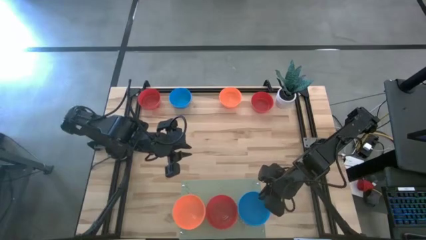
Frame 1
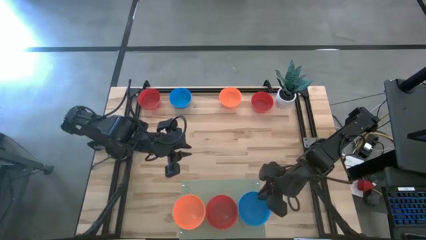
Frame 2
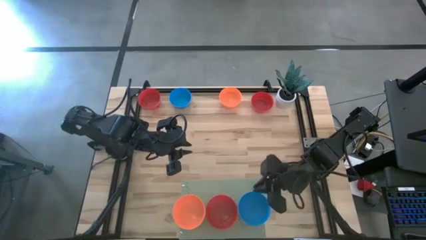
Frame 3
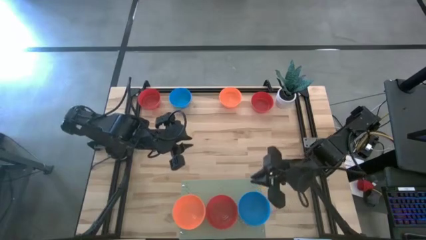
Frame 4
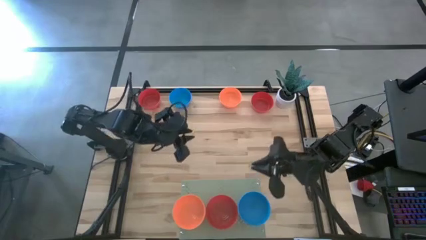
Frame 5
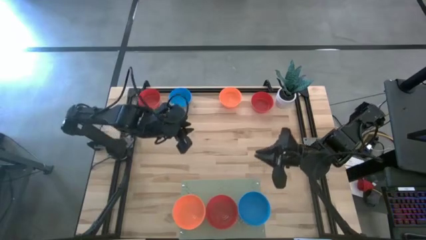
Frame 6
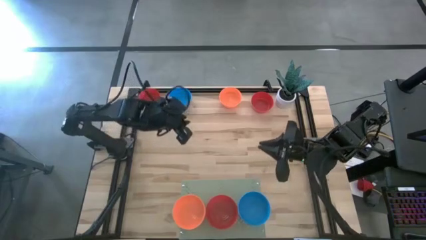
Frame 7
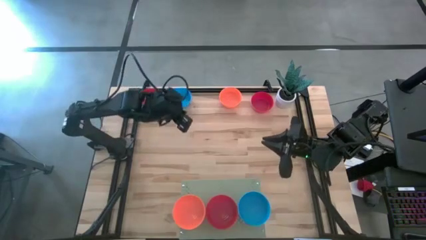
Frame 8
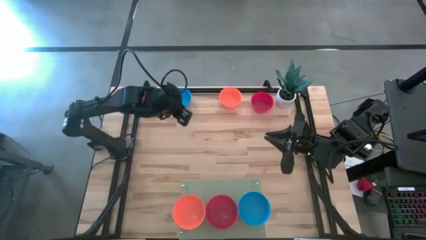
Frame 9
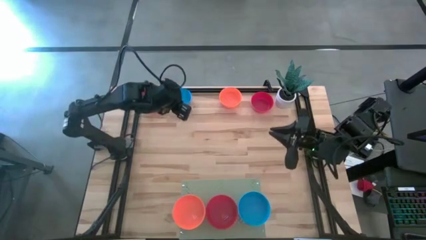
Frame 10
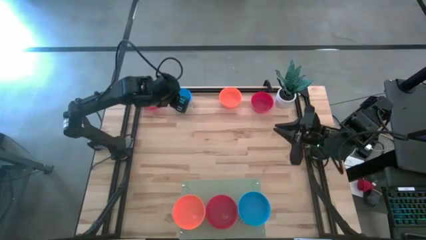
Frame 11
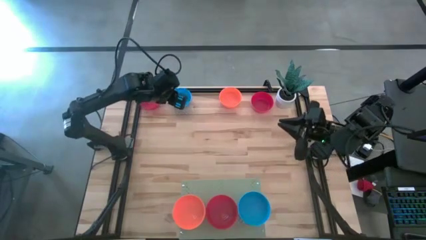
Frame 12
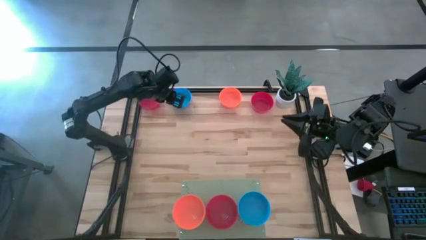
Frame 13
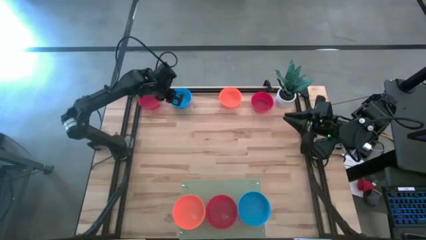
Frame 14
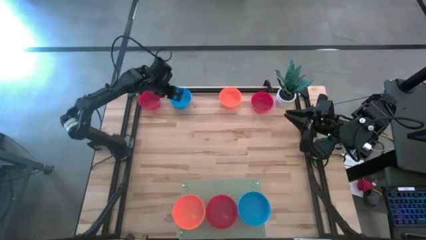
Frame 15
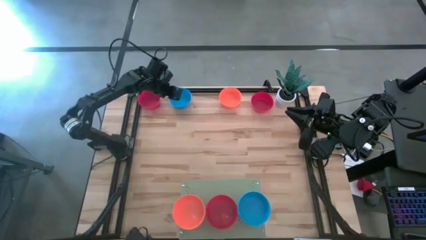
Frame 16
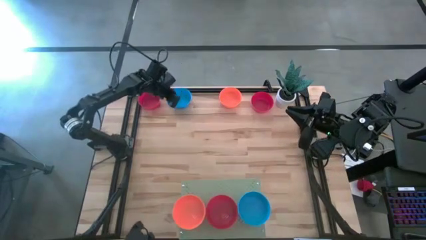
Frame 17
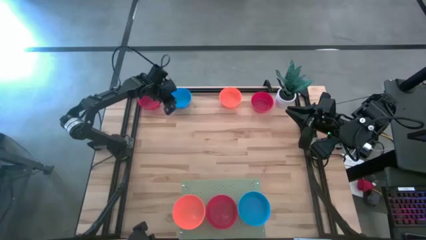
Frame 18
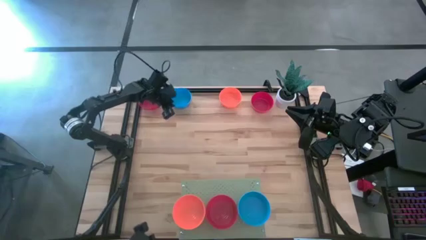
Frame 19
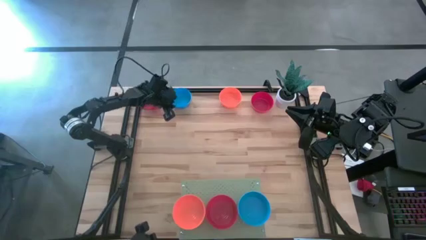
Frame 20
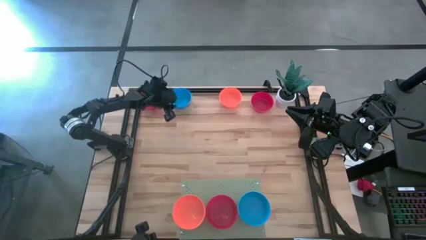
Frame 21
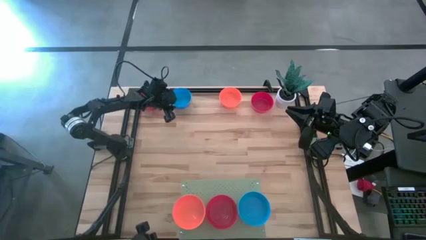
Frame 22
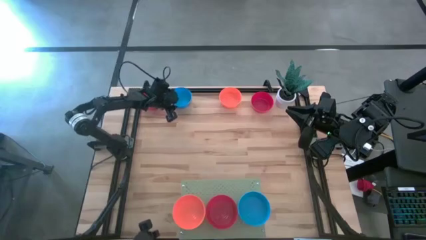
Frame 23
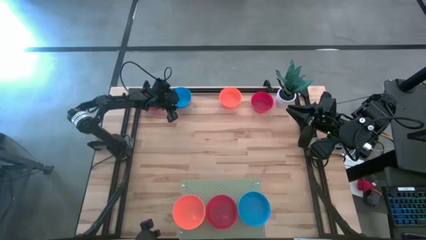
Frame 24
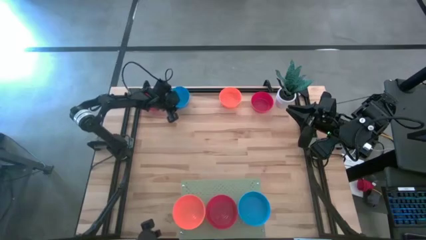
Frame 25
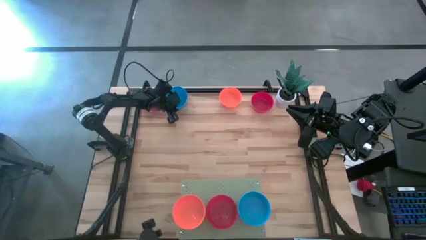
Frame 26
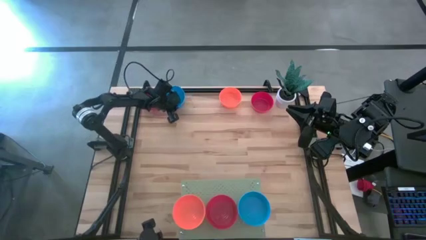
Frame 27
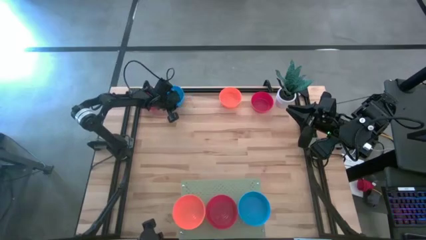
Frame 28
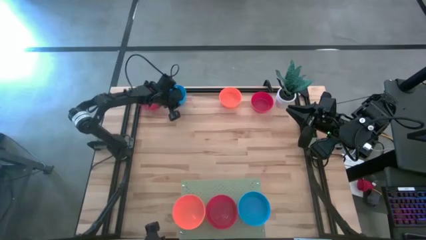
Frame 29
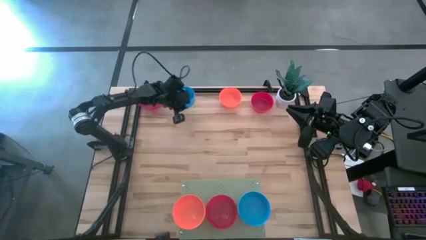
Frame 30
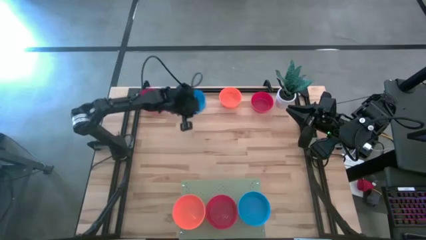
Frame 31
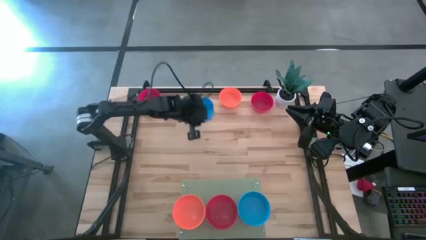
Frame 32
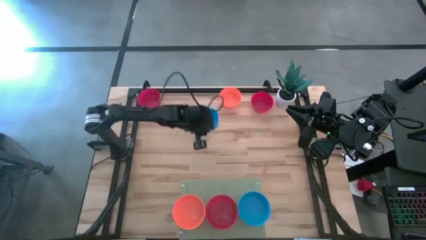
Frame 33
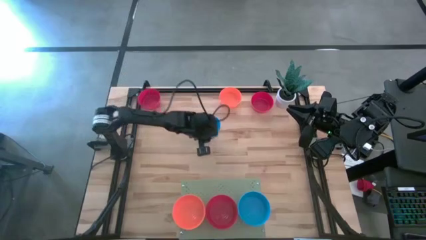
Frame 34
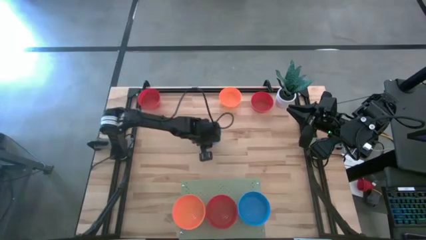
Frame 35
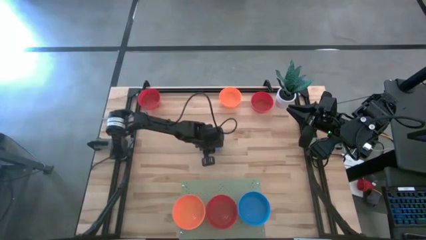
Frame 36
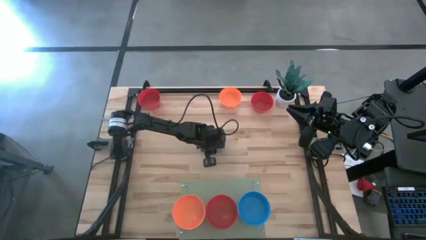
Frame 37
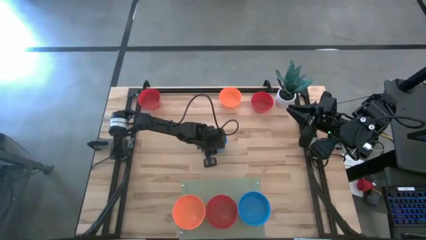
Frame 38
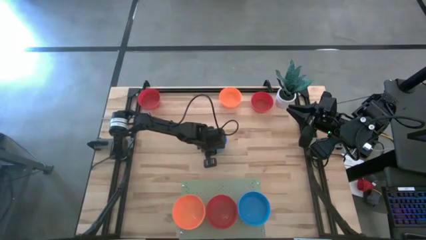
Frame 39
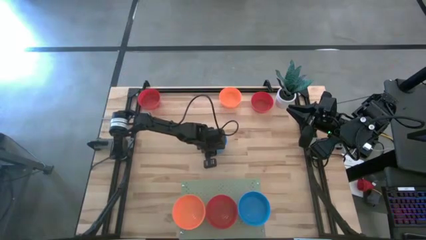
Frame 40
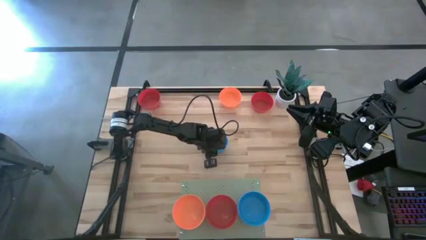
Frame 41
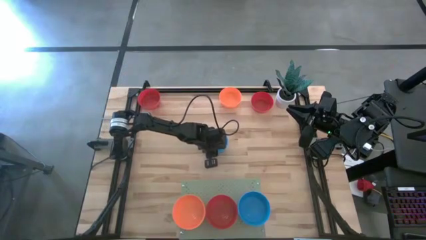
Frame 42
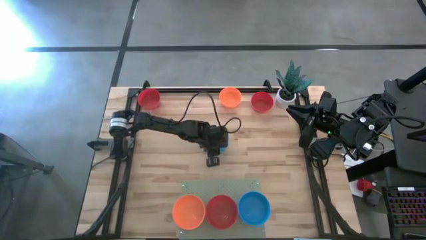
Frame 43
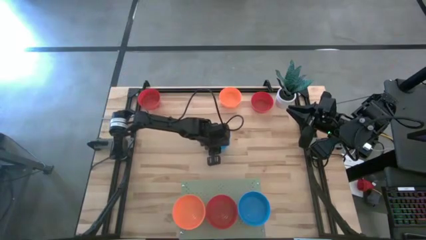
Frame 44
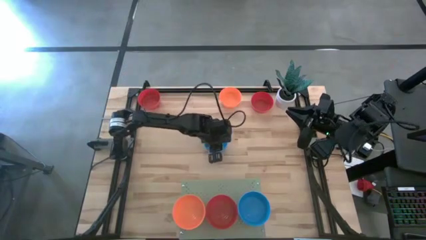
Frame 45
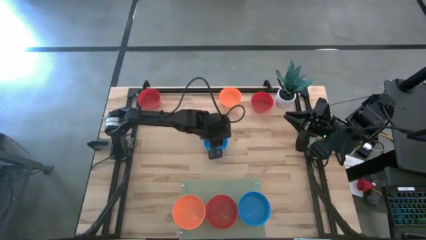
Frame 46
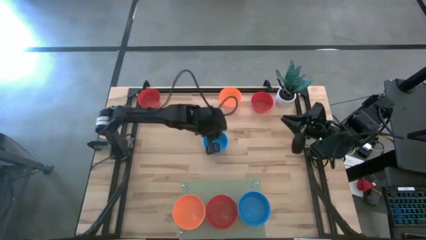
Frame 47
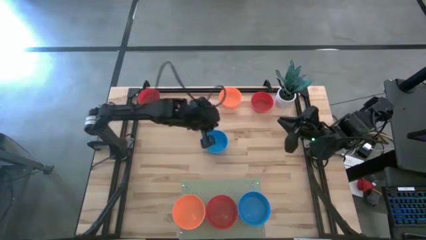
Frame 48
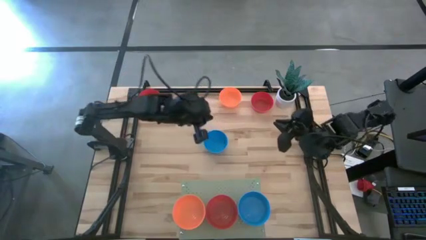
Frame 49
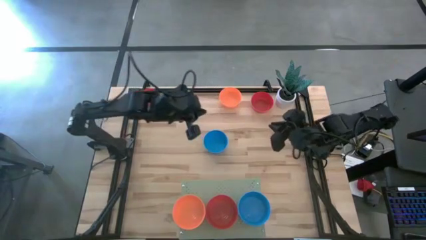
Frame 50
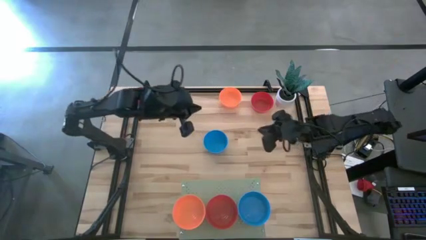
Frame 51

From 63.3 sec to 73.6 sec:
Task: Pick & Place Mini bowls
Stack the blue bowl on the blue bowl on the shelf

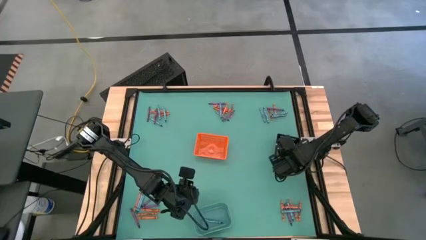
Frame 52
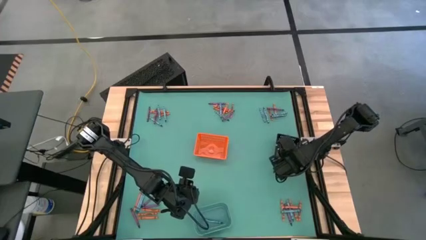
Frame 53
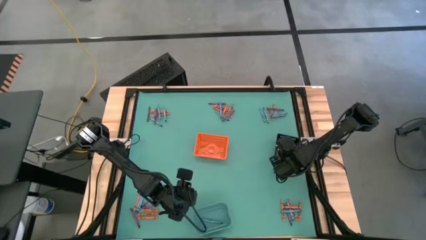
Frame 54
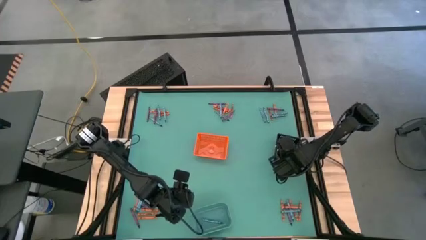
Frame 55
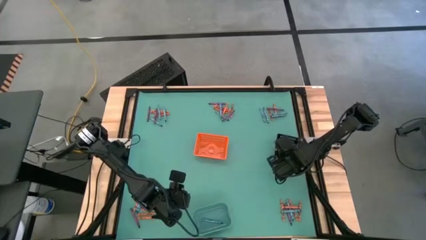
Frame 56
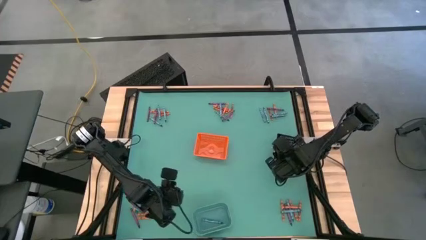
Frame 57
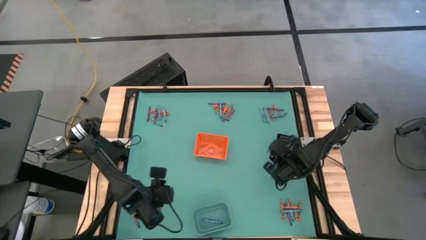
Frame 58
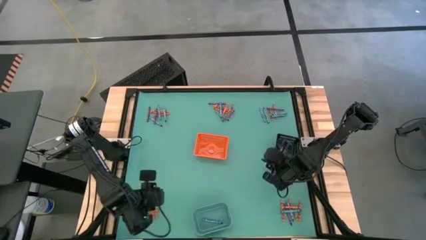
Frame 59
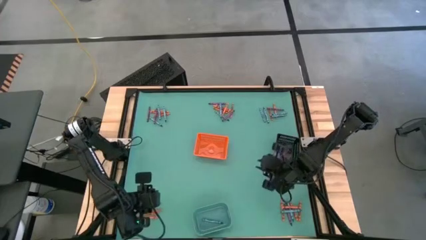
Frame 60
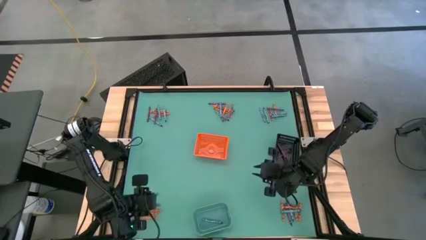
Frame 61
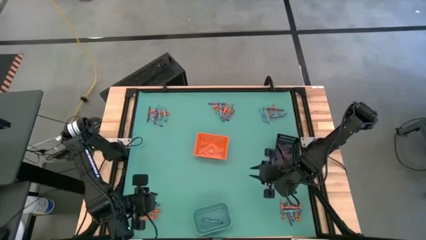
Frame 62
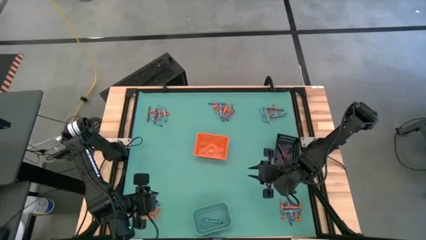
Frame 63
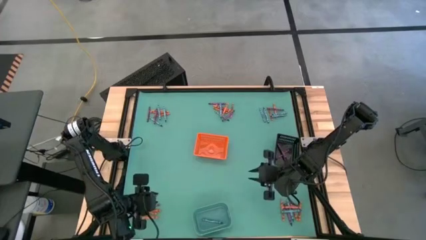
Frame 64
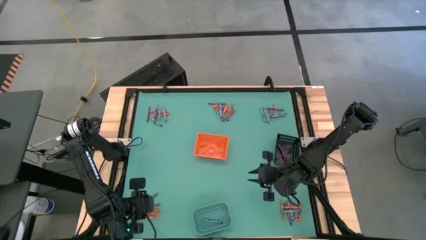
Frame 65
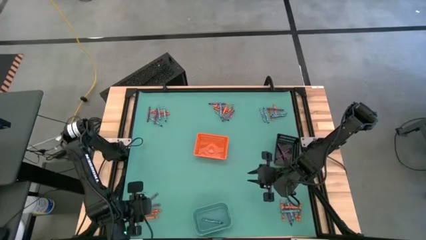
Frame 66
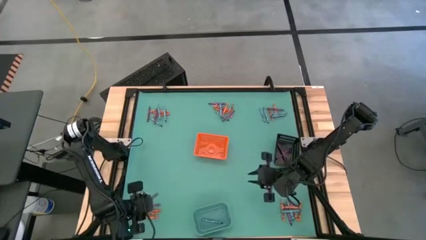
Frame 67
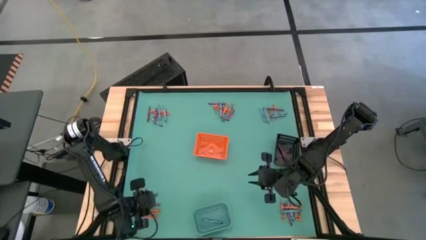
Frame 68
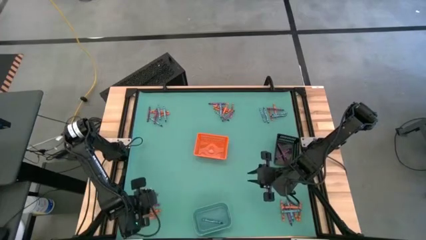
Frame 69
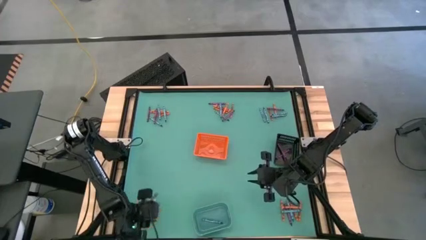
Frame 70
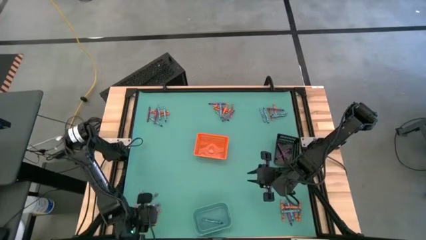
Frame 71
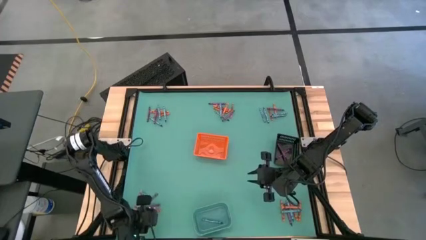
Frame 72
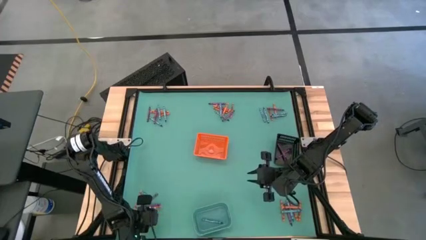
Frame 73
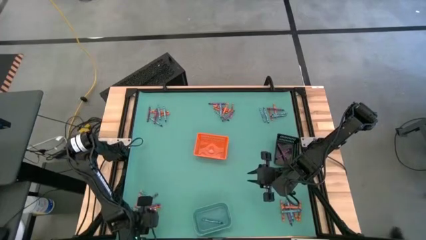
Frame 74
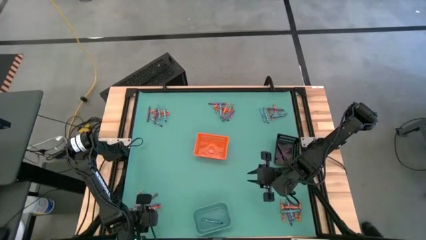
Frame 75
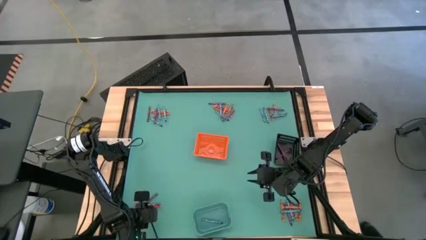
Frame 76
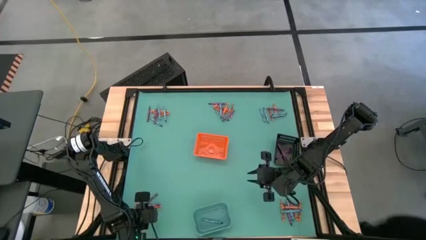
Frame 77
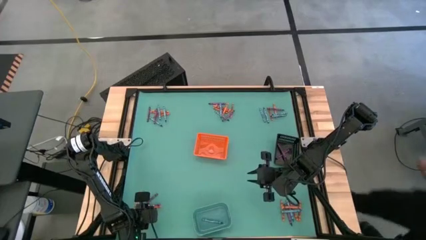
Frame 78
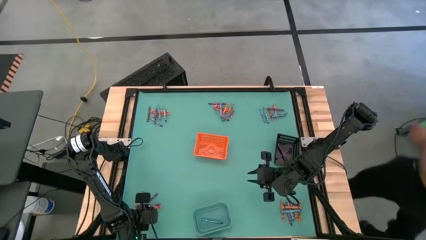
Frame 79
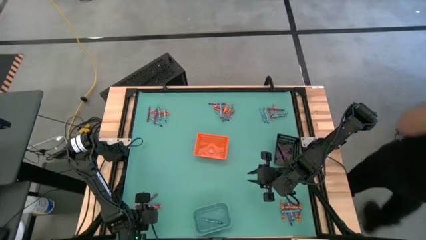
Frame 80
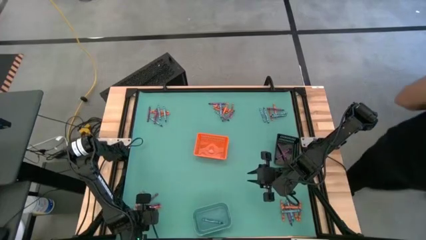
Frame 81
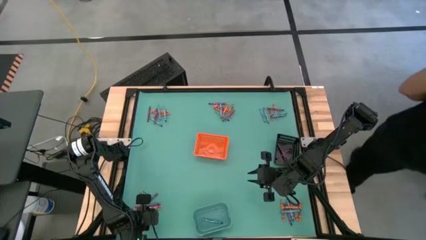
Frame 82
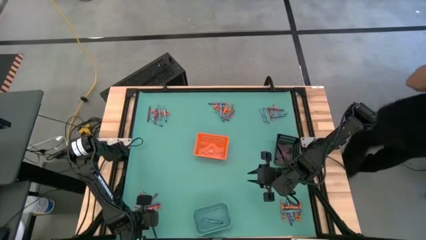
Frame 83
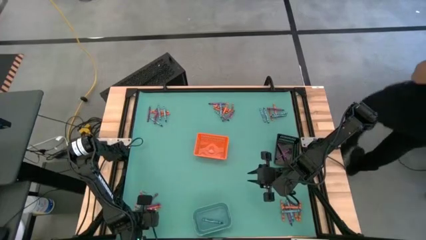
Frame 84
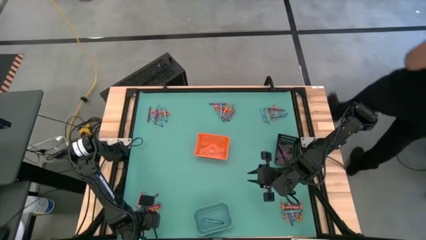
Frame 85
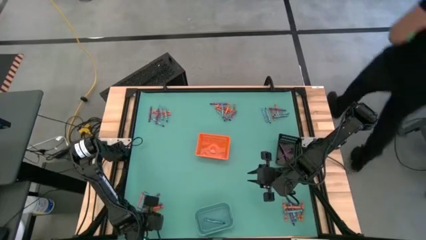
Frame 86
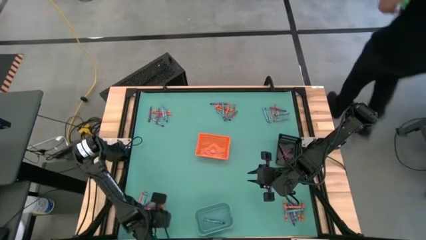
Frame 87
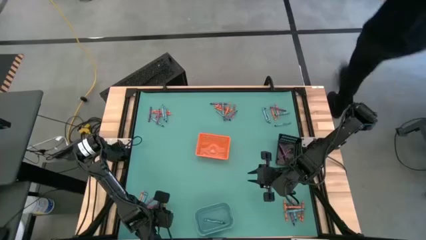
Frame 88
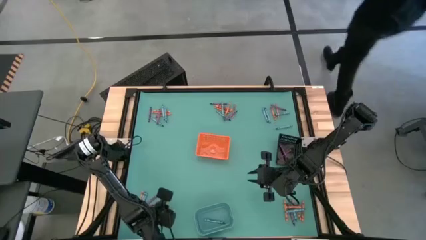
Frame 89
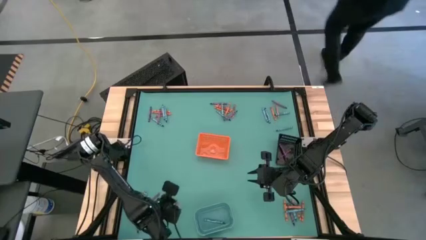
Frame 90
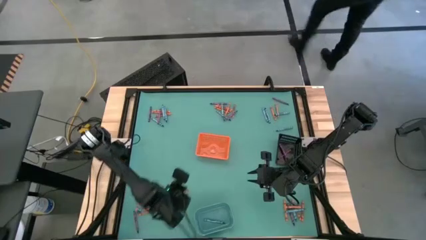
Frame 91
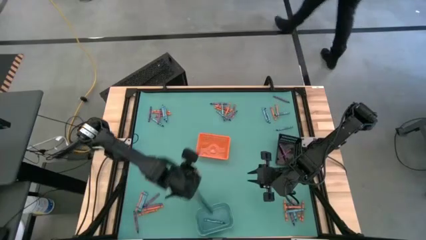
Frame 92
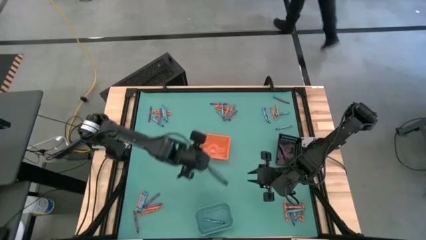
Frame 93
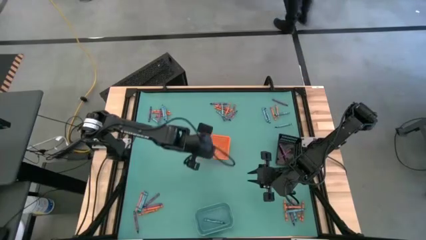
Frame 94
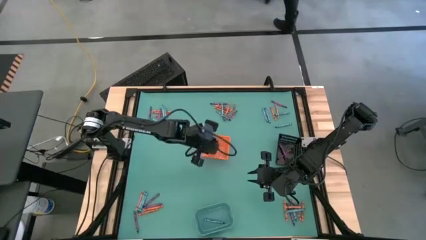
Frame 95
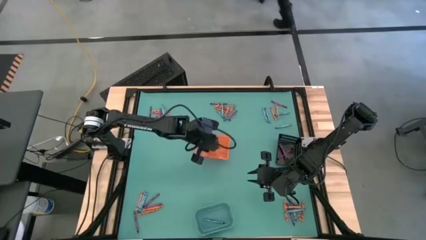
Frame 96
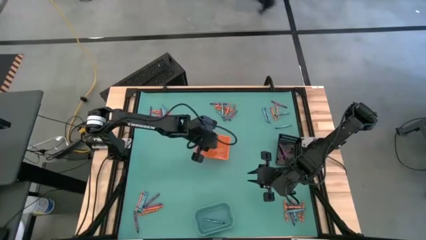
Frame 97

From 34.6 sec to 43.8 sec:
Task: Sort crayons
Put the orange crayon into the orange bin
